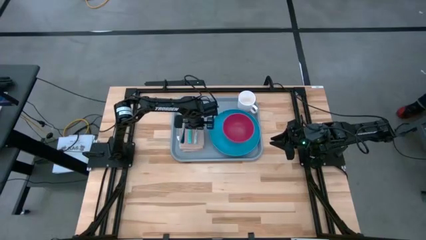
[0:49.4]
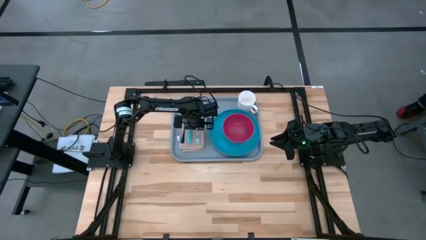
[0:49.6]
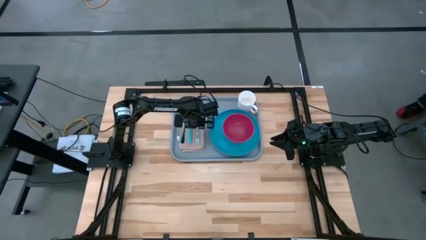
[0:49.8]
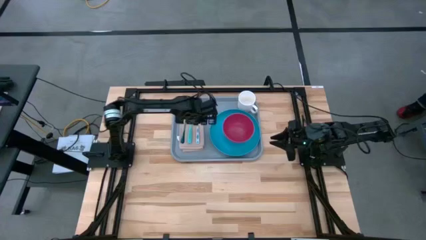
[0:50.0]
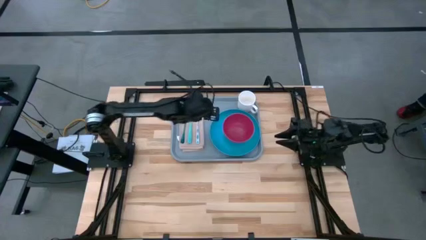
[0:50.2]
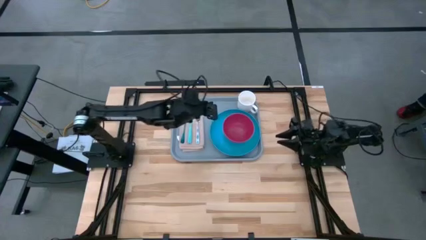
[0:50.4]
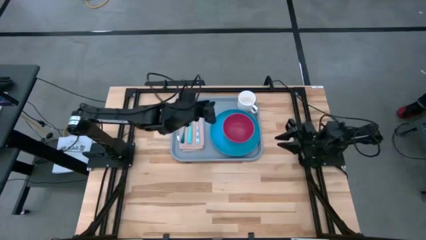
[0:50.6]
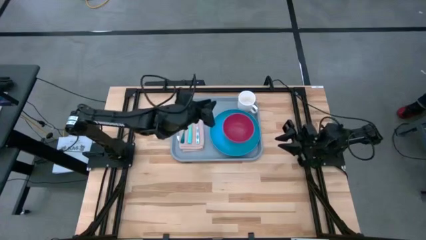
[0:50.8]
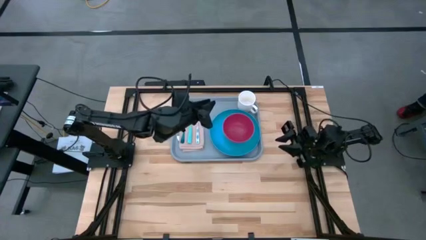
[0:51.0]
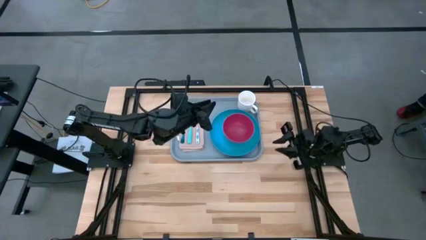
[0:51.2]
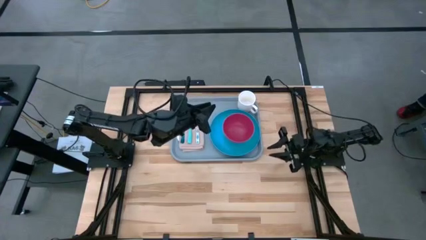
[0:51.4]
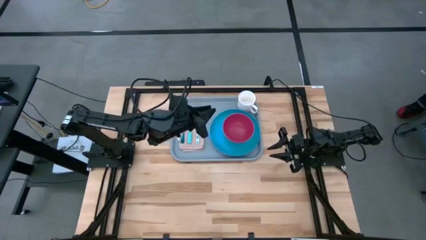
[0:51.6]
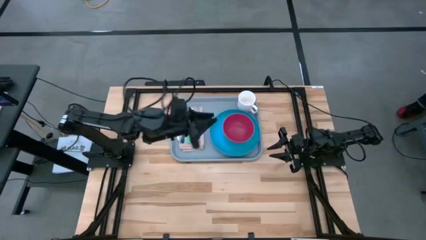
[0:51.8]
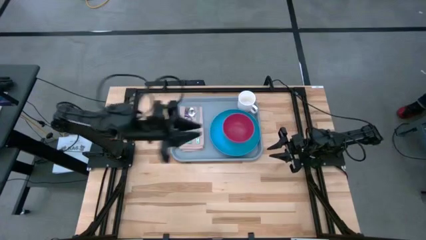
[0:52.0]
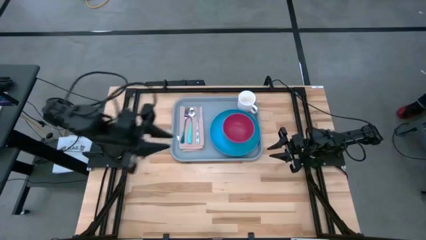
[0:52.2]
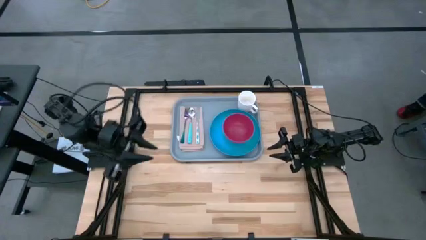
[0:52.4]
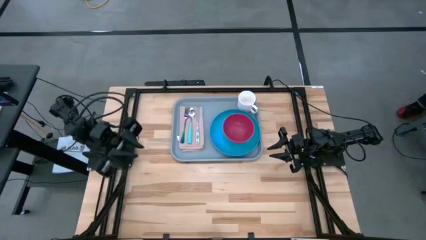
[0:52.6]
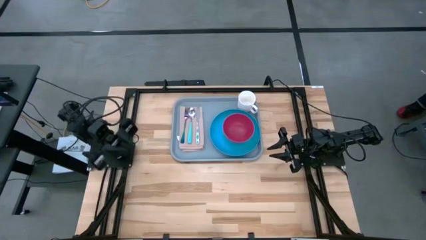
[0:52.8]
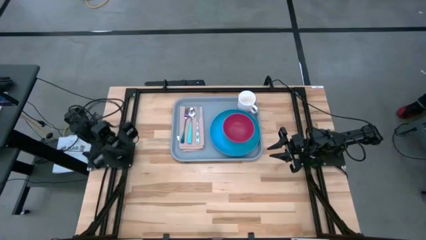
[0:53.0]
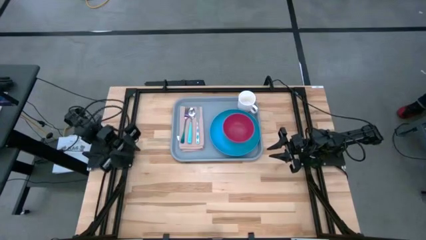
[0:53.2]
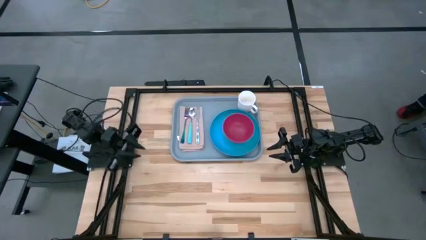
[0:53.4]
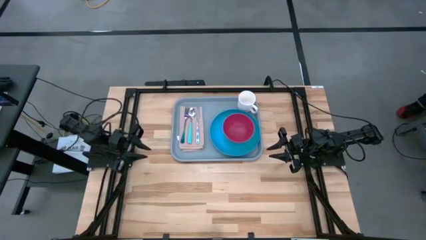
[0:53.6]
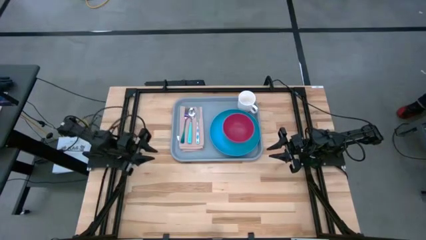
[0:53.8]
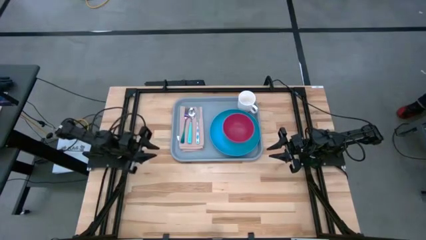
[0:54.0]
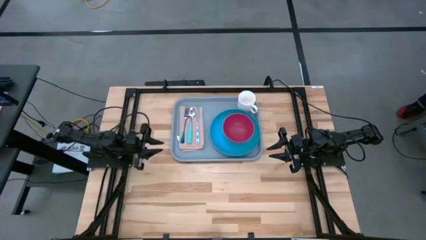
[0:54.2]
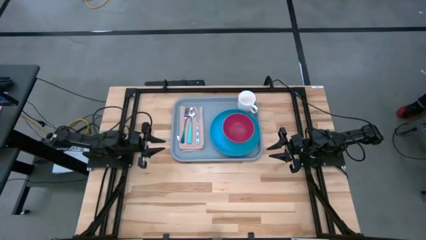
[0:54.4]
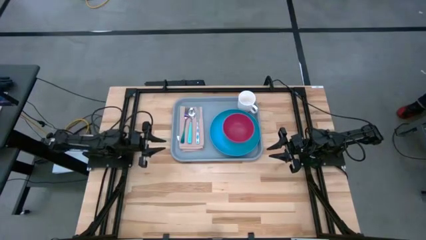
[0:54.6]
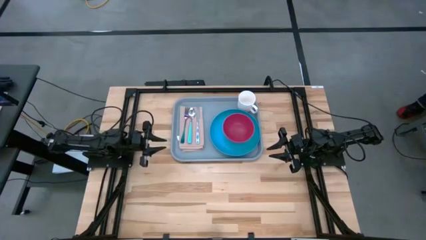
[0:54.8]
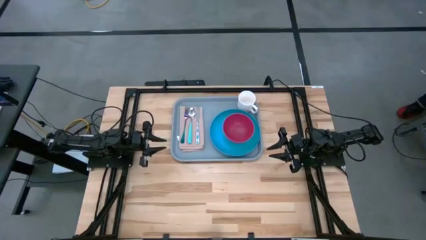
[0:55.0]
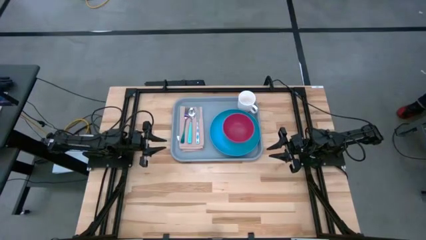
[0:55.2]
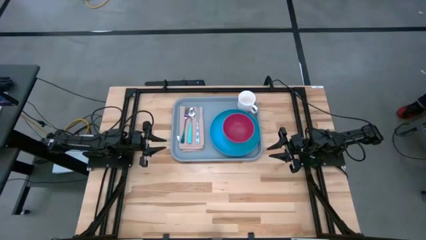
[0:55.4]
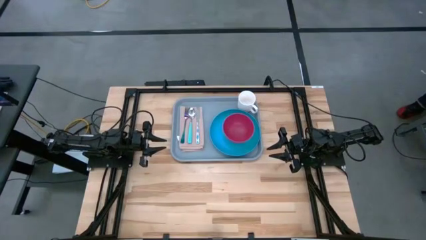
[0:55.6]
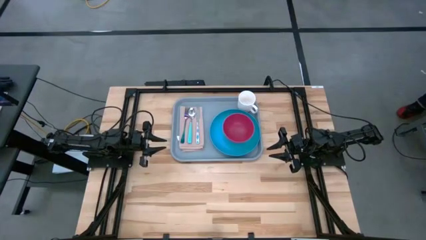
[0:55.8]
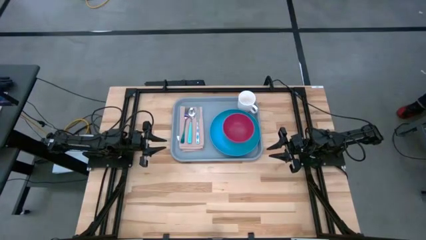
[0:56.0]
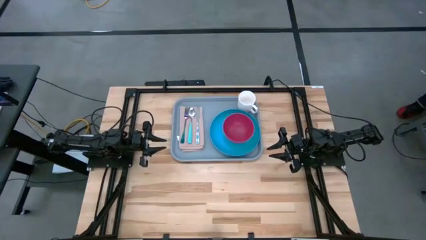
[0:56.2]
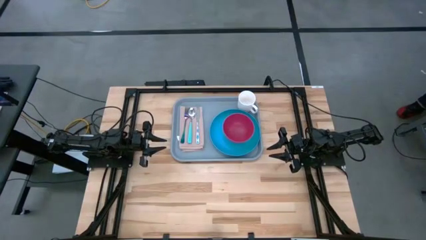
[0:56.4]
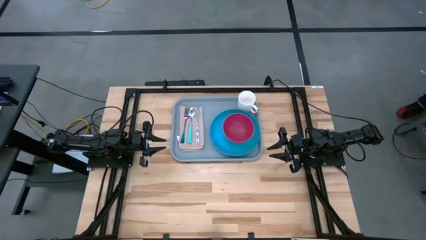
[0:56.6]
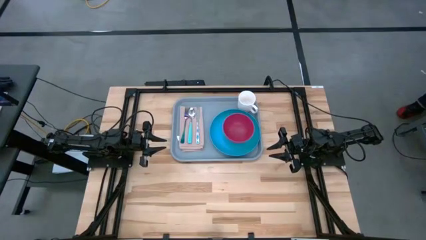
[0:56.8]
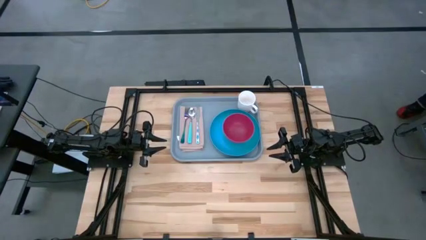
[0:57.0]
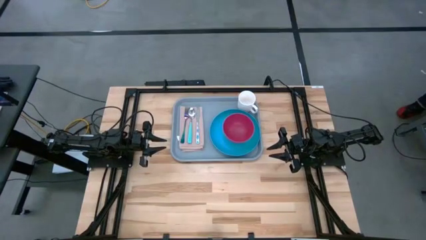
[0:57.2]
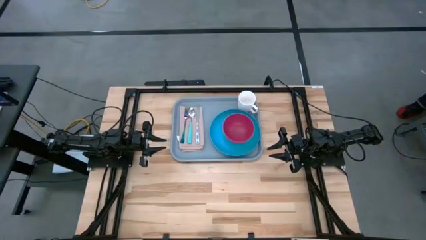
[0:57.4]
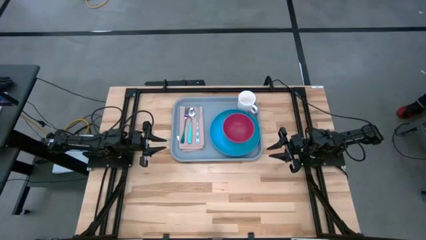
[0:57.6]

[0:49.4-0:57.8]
Task: Set up tray
Return to Home Position

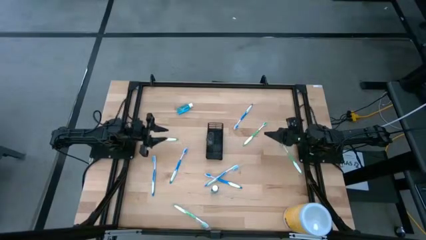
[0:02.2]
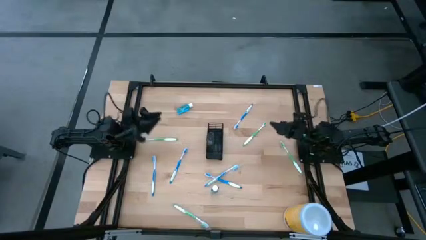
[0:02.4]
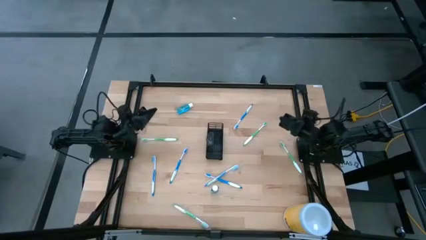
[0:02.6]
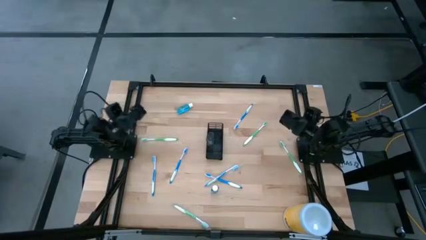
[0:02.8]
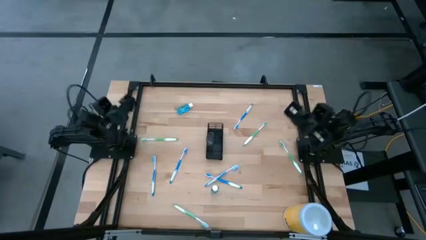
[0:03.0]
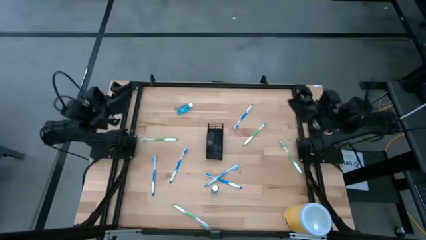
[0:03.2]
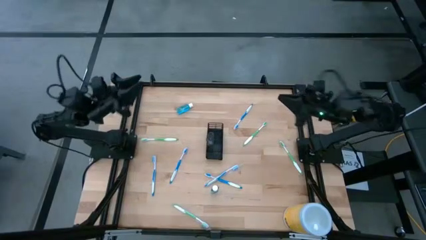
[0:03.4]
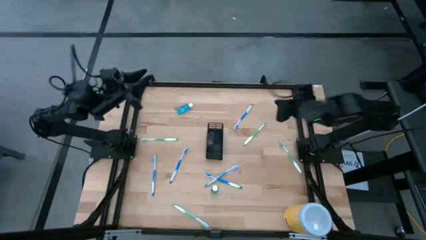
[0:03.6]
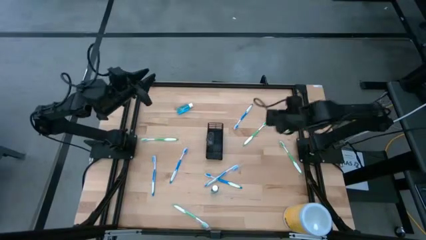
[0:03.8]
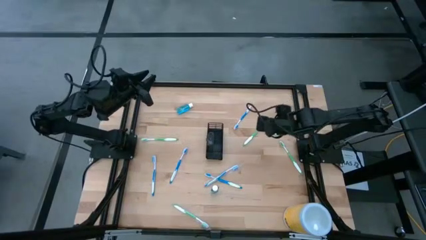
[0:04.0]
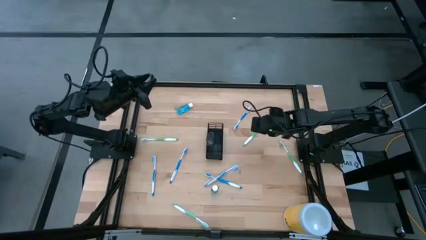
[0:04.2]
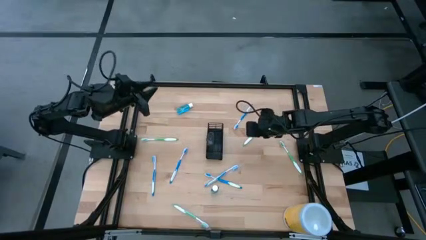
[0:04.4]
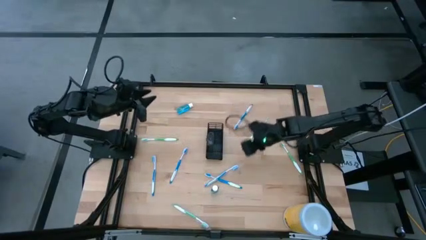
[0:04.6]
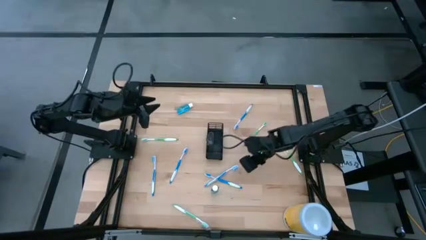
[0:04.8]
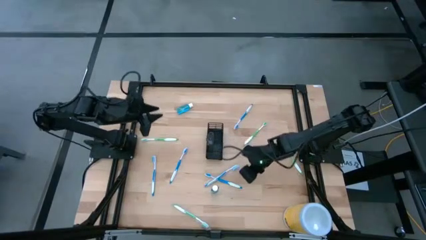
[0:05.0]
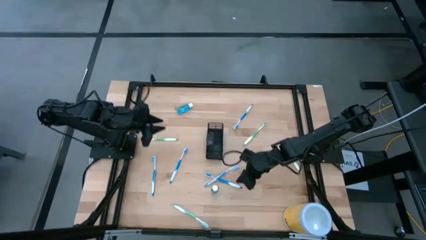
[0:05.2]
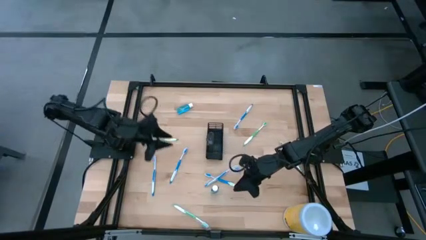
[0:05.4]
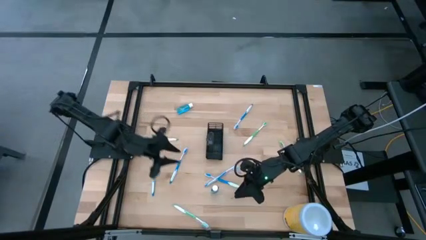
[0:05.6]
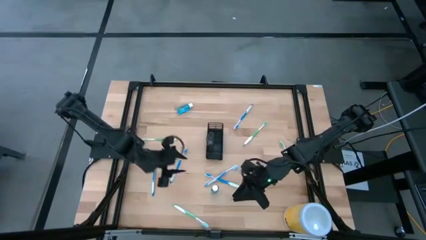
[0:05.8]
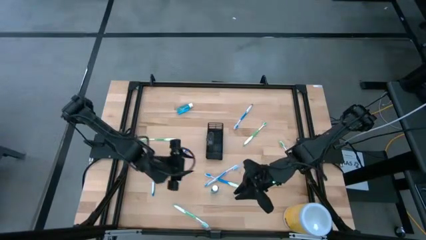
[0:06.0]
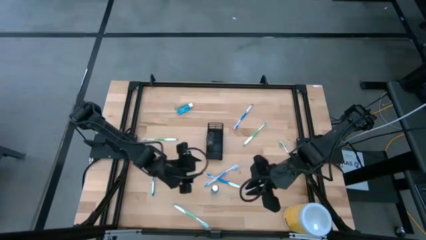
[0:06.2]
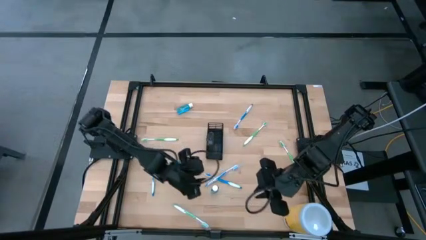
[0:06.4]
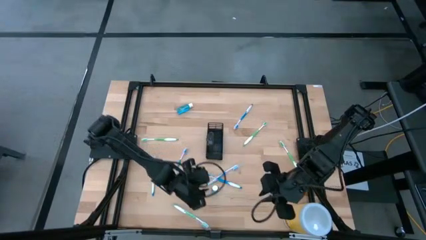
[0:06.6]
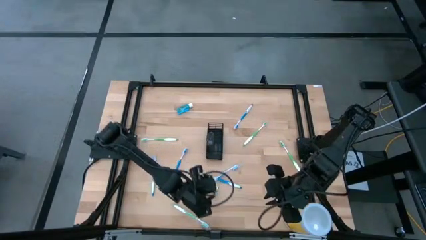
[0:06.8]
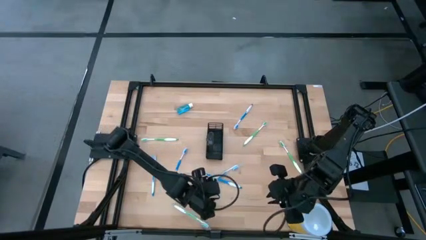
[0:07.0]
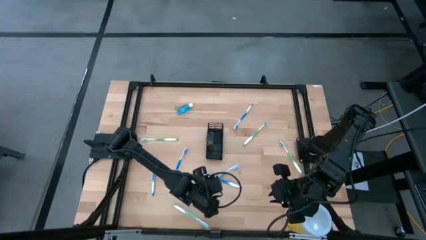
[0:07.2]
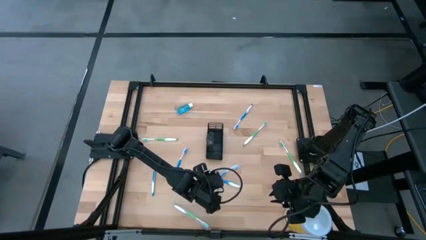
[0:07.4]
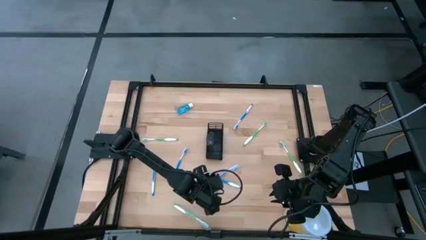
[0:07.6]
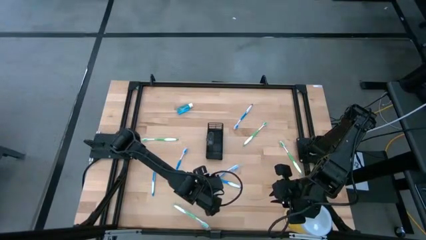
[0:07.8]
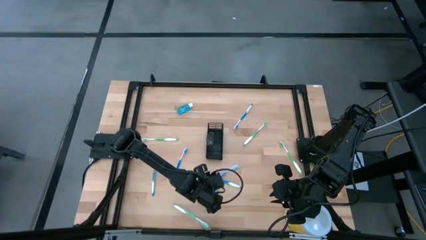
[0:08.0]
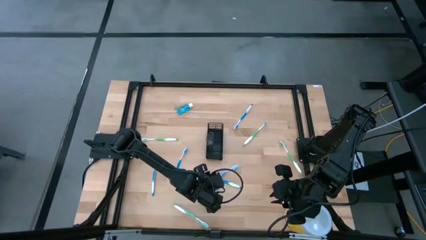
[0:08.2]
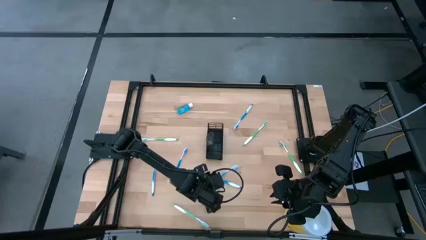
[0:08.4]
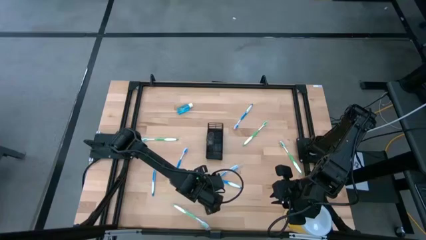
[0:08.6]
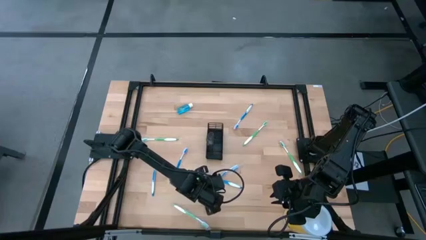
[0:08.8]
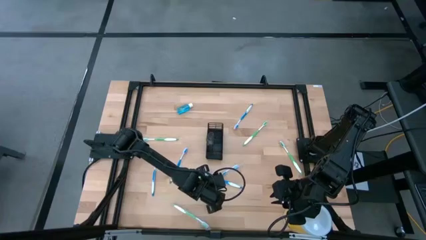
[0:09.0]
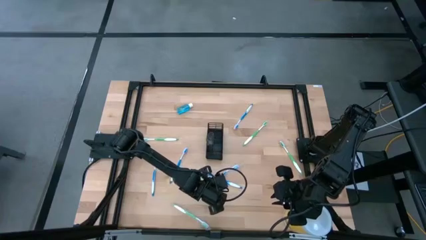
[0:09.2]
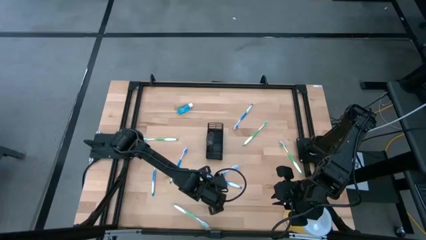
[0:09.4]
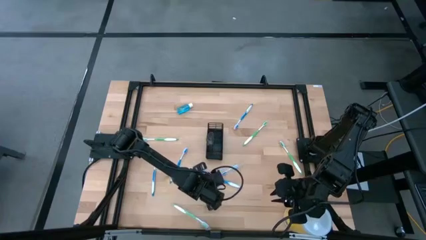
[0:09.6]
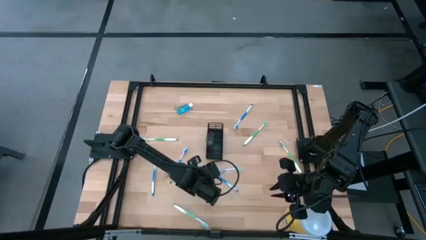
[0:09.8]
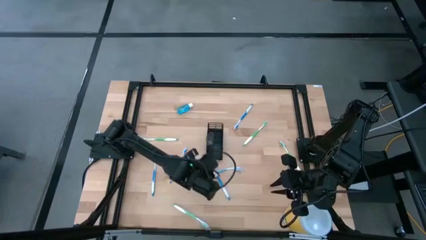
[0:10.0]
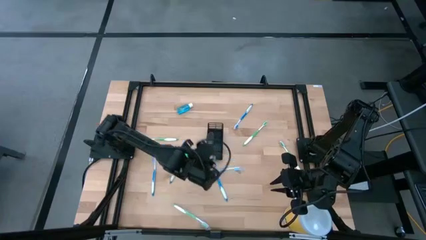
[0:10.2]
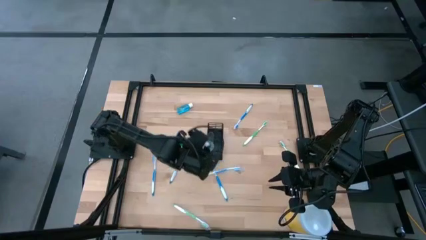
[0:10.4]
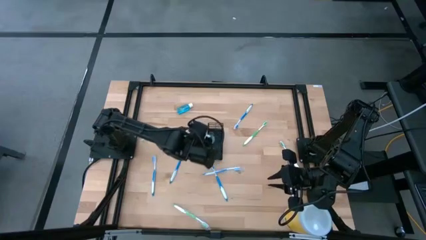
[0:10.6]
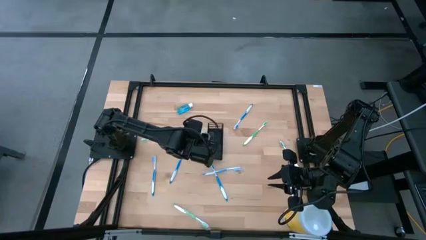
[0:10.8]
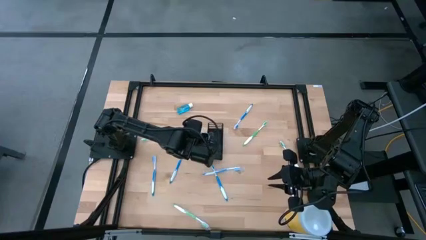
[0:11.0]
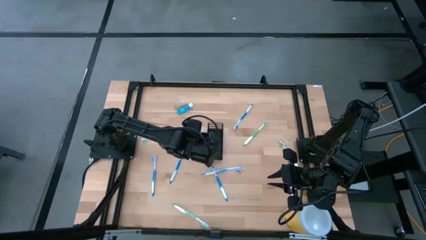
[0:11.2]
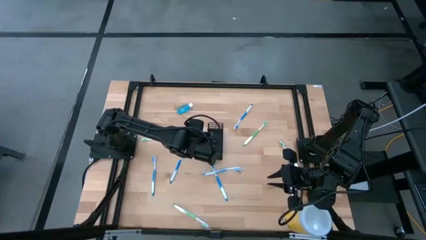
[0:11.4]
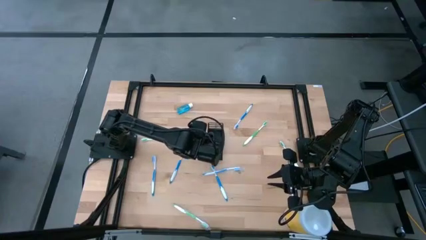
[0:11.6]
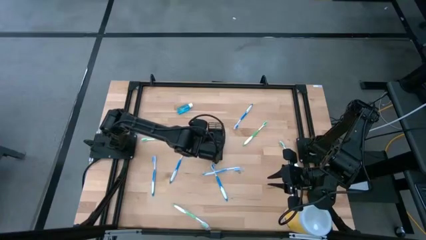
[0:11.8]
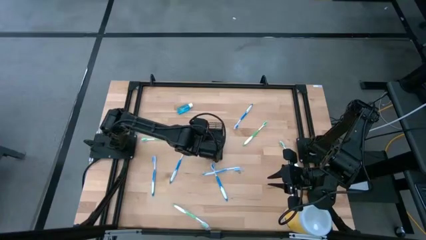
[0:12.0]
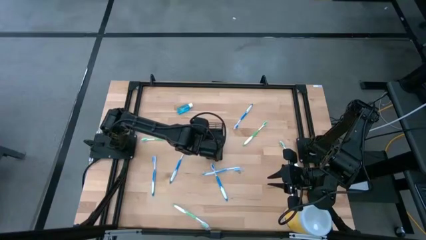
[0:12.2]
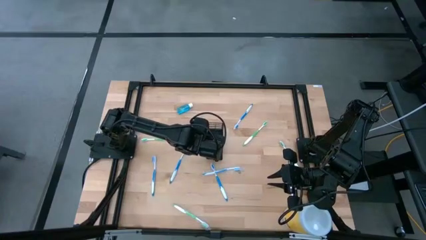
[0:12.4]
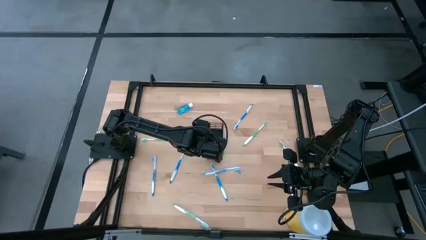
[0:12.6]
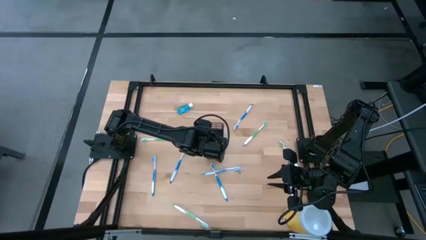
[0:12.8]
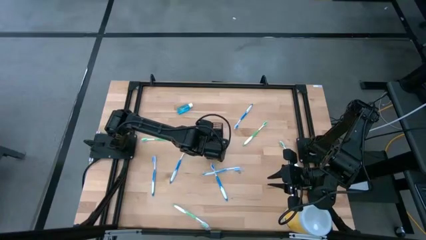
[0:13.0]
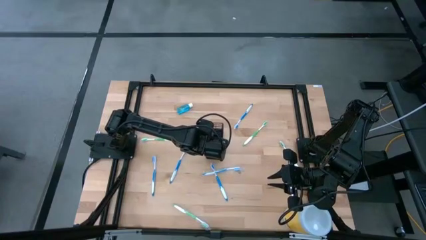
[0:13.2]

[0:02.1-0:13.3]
Task: Pick & Place toothbrushing station
Put the blue mouthwash bottle into the black organizer
